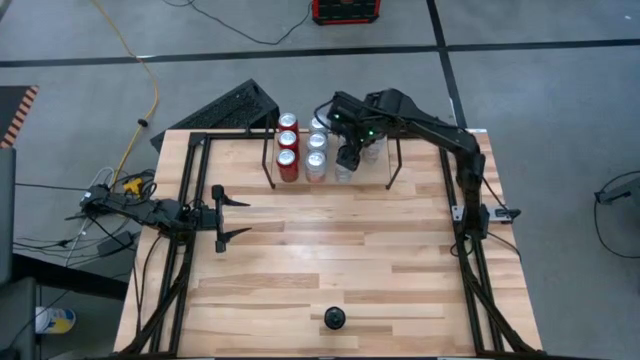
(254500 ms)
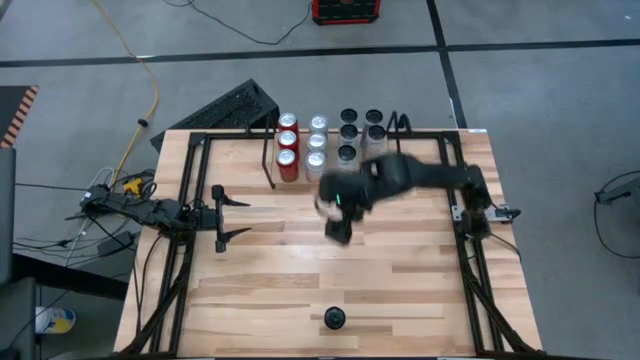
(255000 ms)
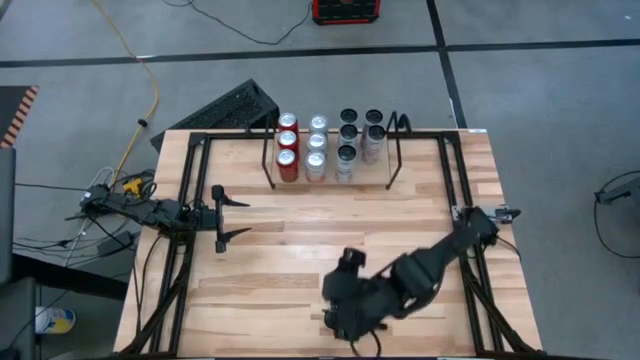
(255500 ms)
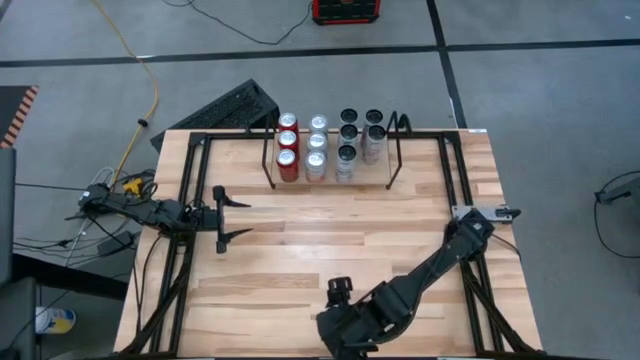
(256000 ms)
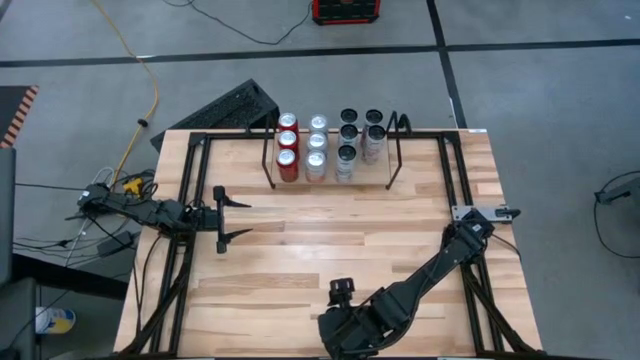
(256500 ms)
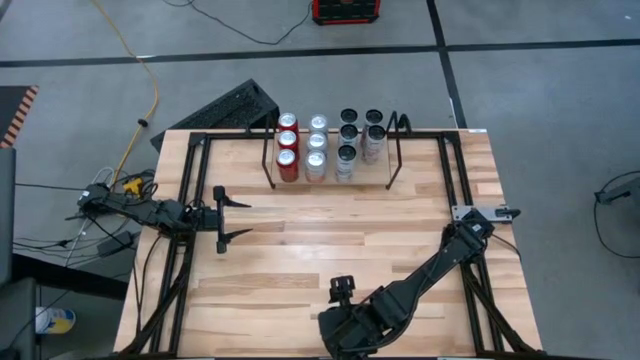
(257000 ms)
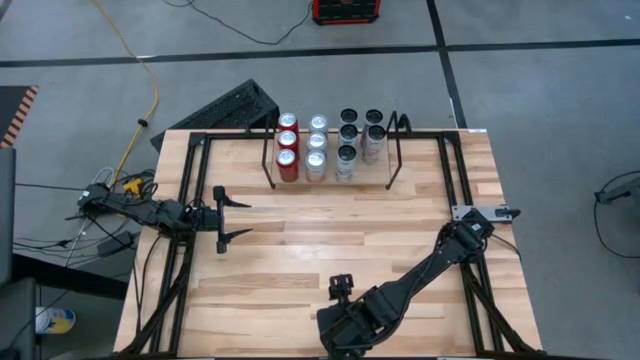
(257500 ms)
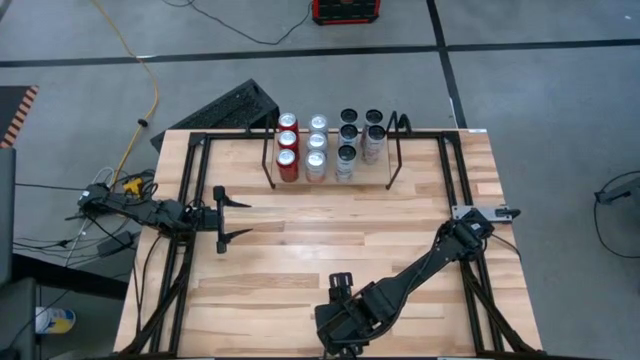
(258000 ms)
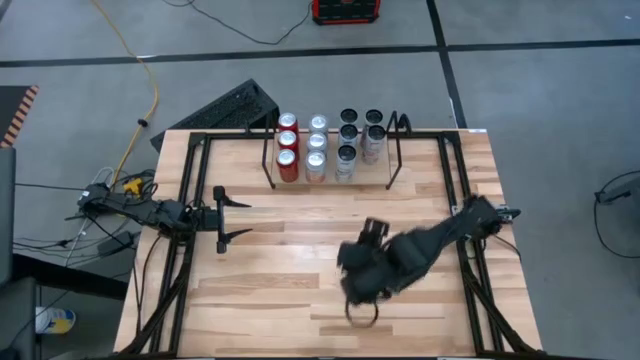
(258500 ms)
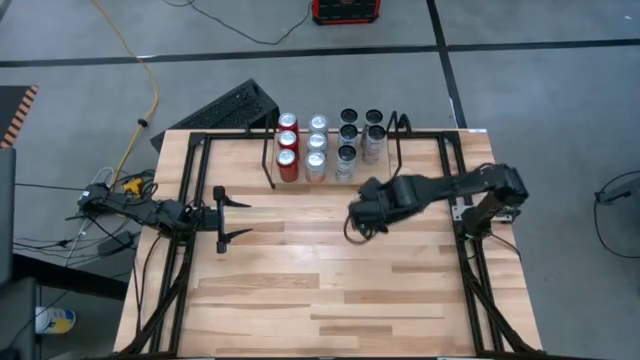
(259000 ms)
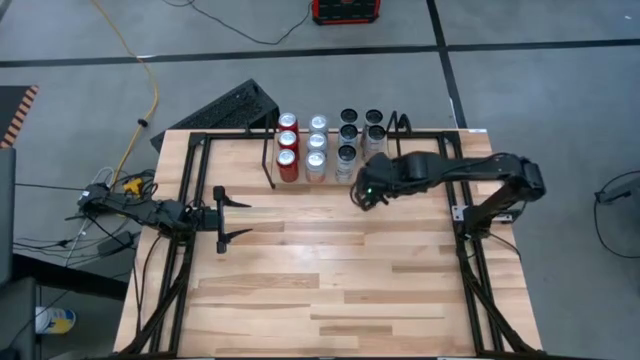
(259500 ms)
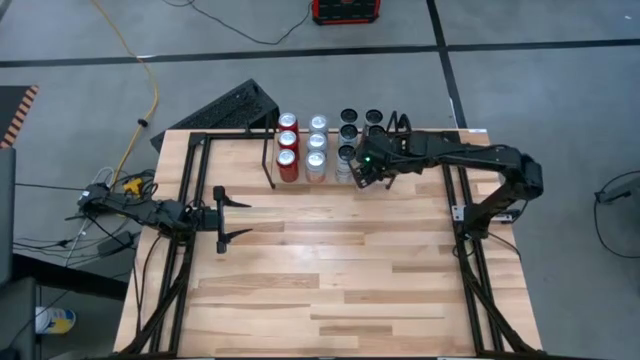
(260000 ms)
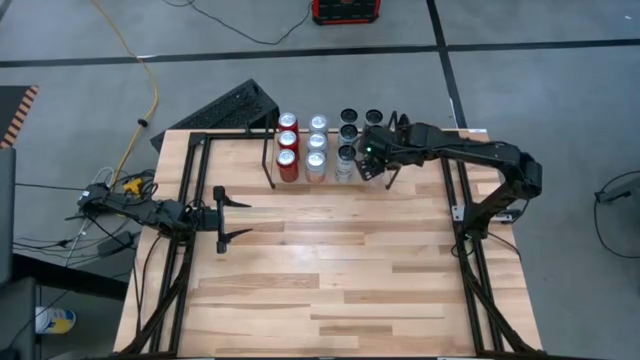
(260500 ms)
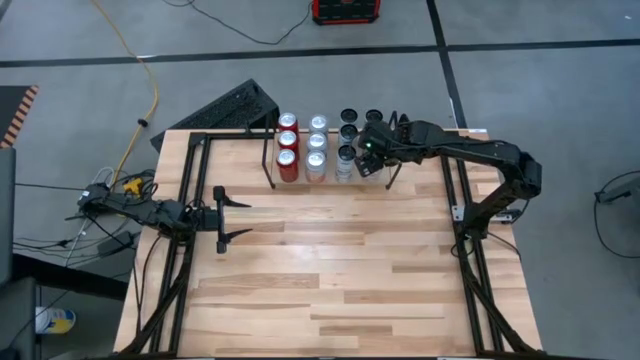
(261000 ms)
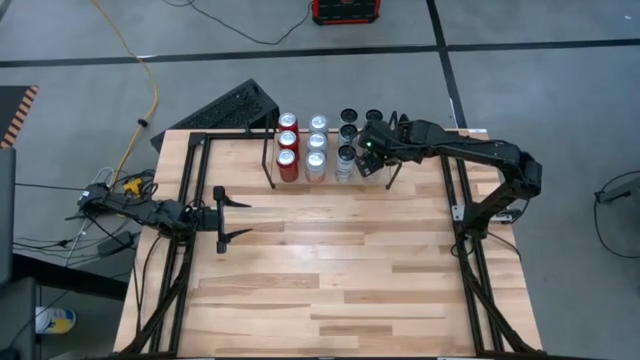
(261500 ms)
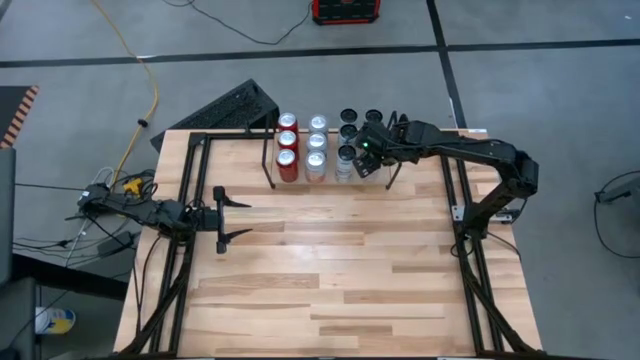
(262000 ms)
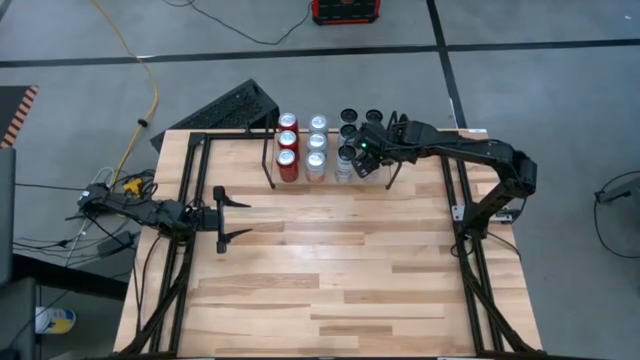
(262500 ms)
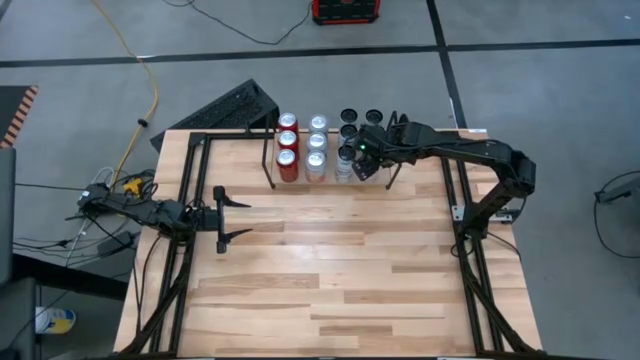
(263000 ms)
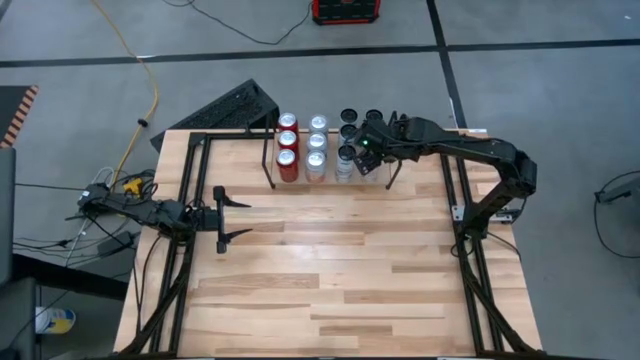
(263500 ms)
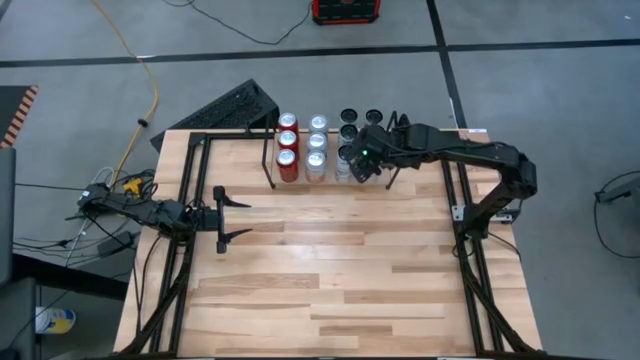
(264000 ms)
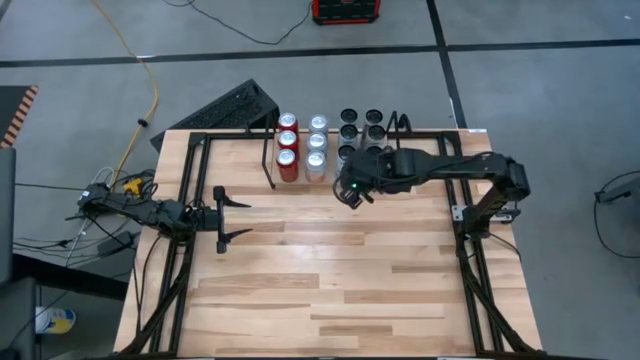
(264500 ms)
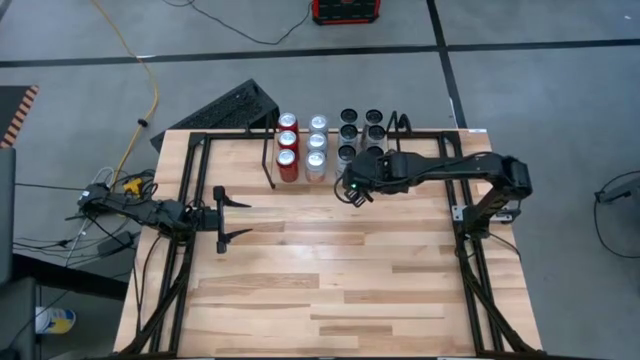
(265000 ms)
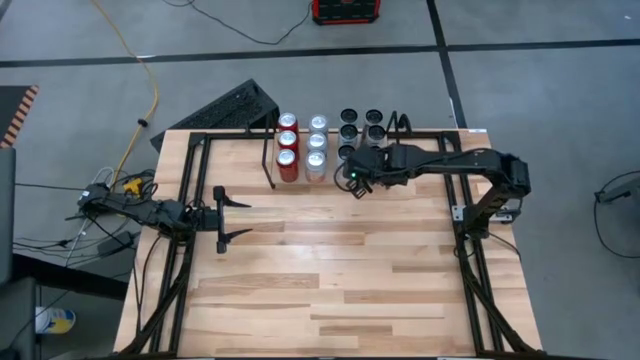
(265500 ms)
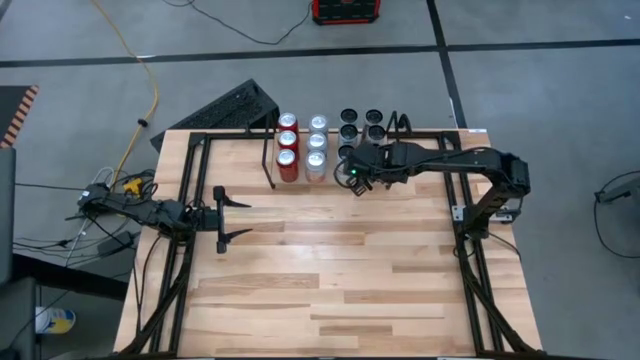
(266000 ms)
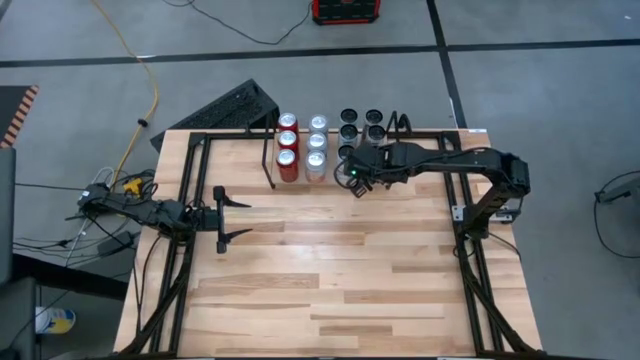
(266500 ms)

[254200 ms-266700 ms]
Task: Place canned beverage on shelf
Put the right white pink soda can on the shelf and align with other white pink soda cans

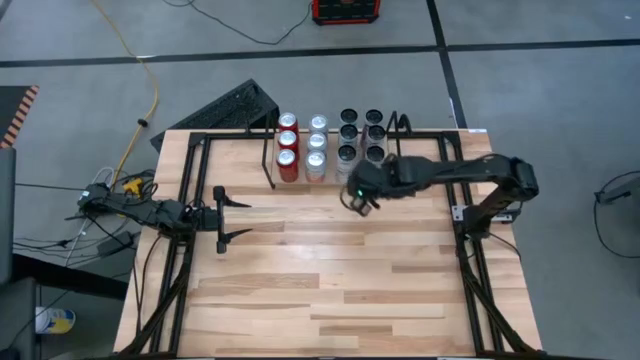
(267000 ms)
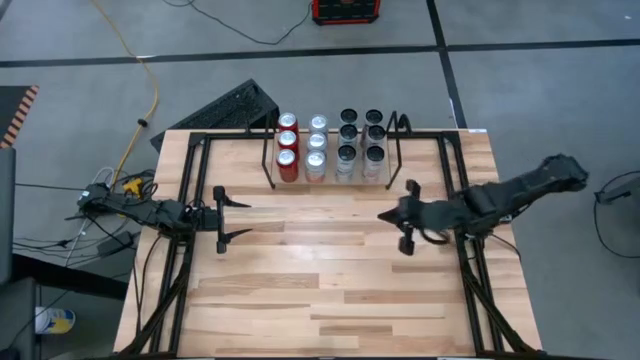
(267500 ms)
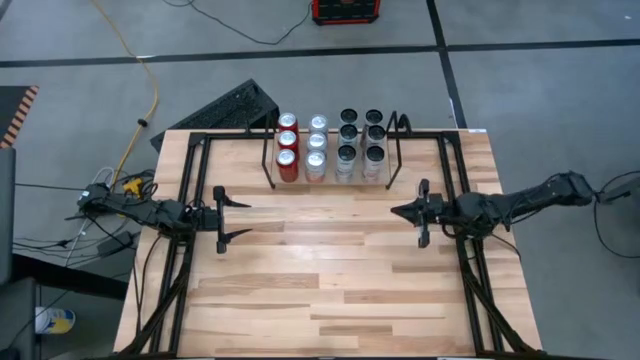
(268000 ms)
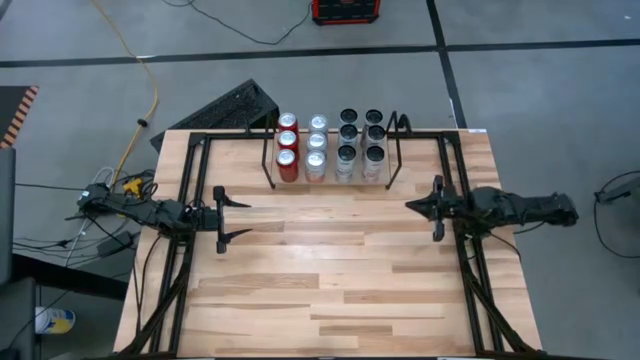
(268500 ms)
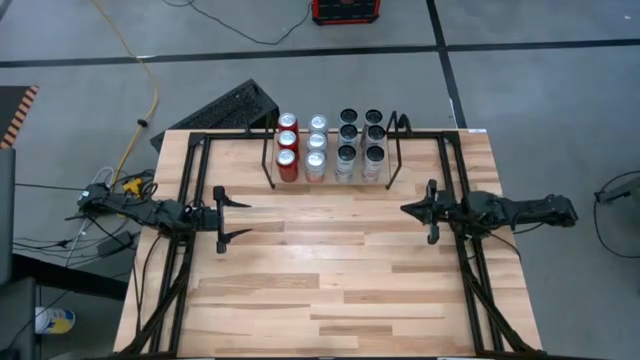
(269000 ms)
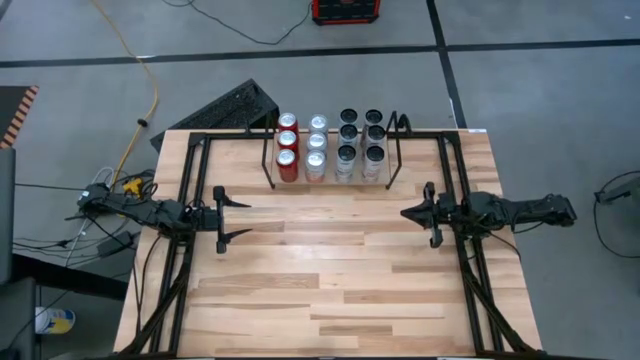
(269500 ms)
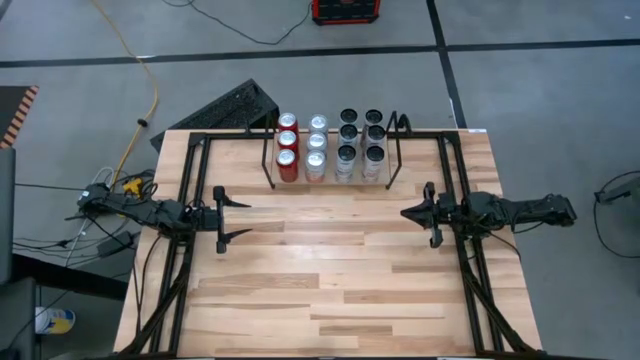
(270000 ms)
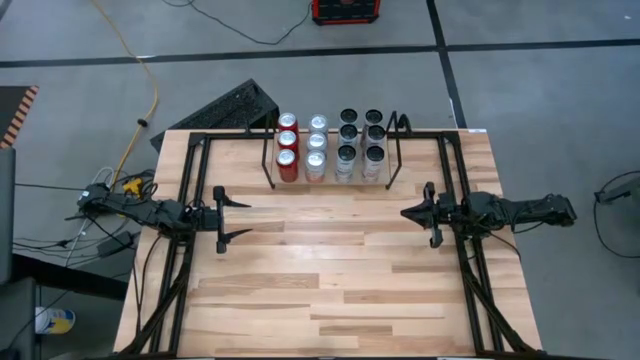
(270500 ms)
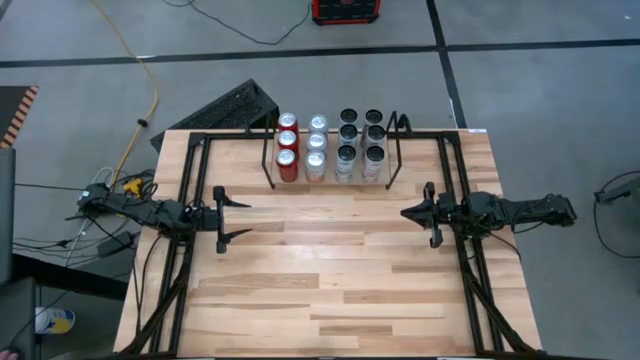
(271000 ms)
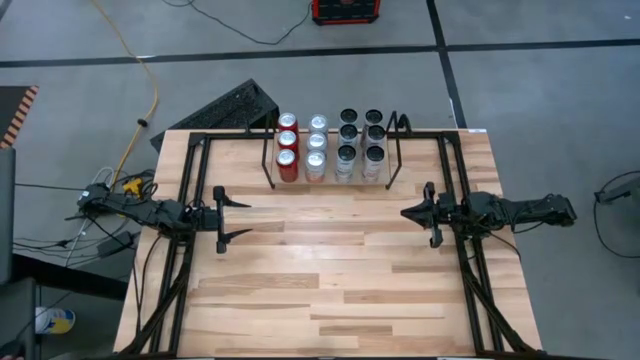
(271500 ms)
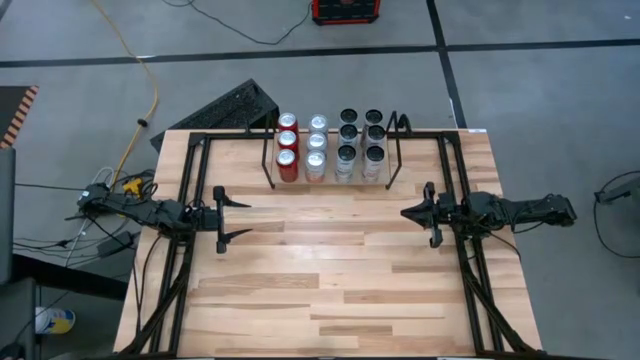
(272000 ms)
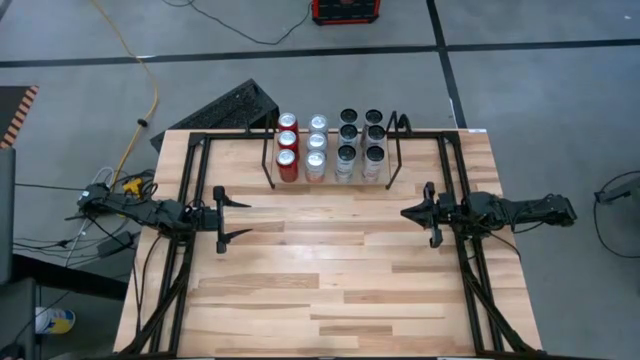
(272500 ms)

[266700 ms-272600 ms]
Return to Home Position

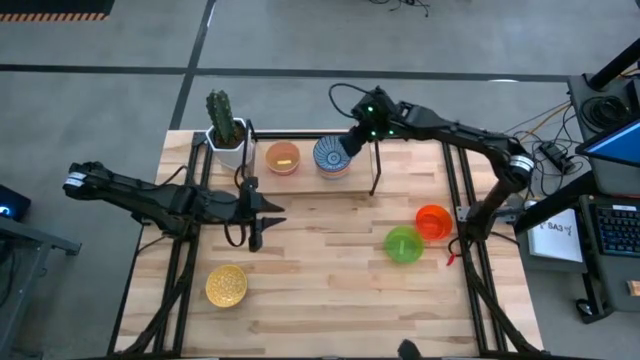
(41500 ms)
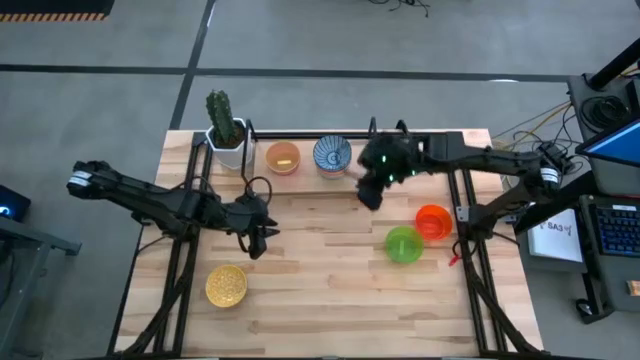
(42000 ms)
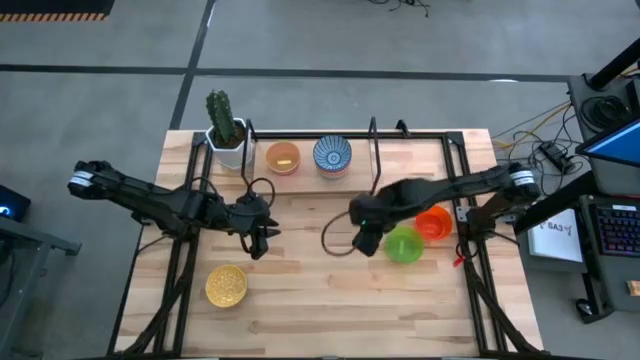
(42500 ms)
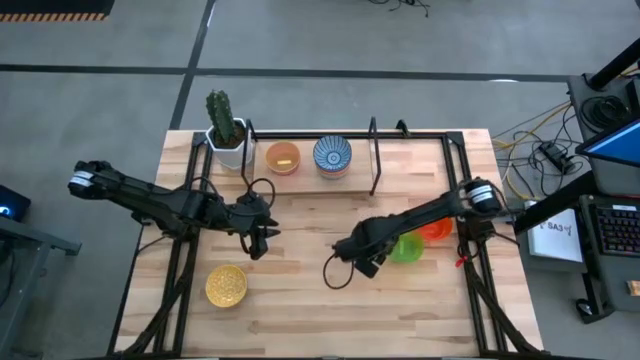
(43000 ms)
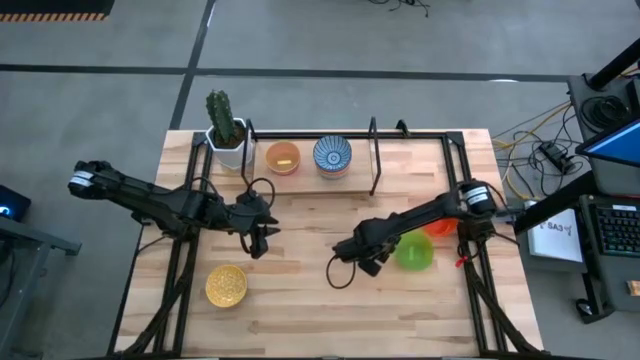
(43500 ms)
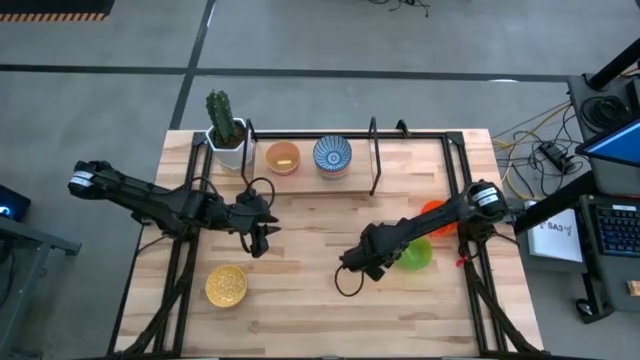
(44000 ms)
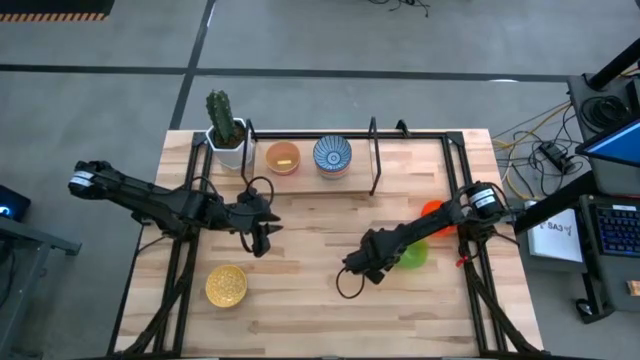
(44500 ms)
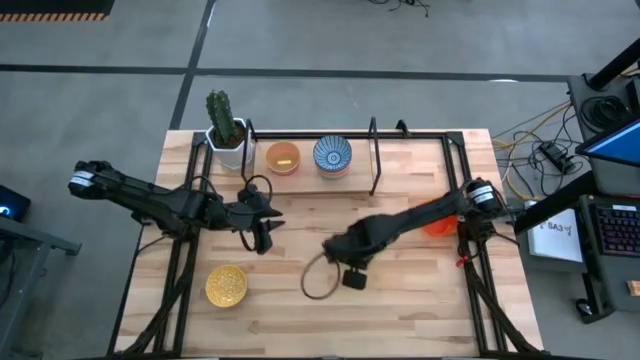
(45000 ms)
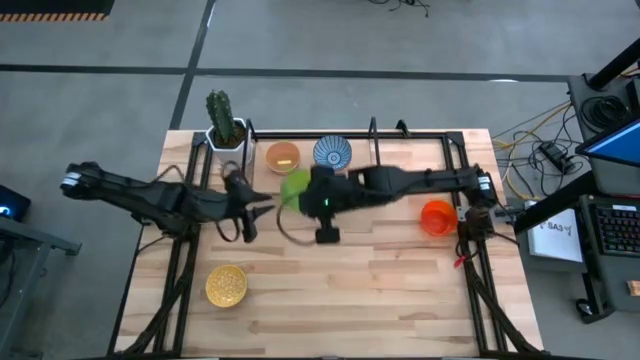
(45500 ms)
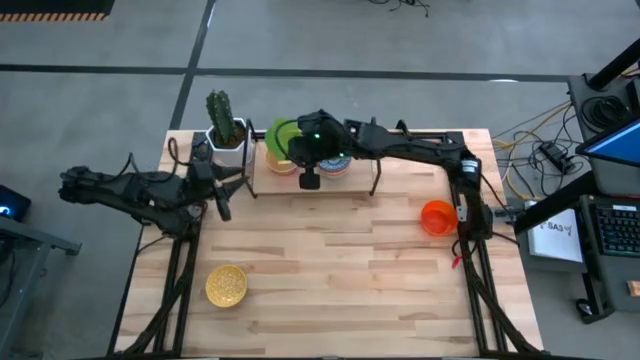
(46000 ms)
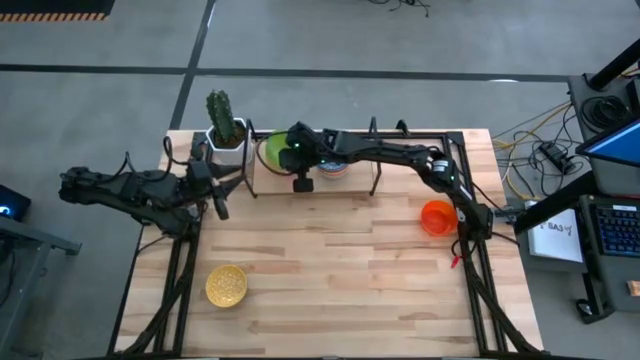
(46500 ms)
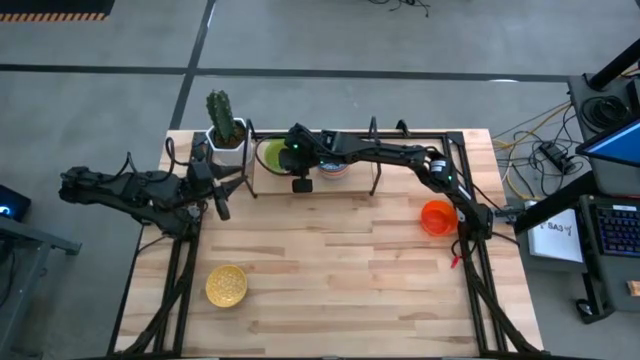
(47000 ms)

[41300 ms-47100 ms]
Task: Place and stack bowls onto a shelf
Stack the green bowl on top of the yellow bowl on the shelf
